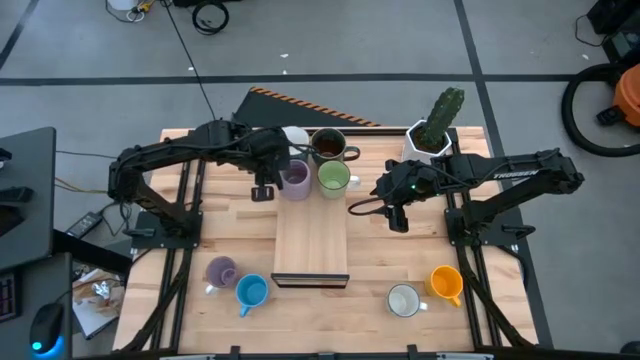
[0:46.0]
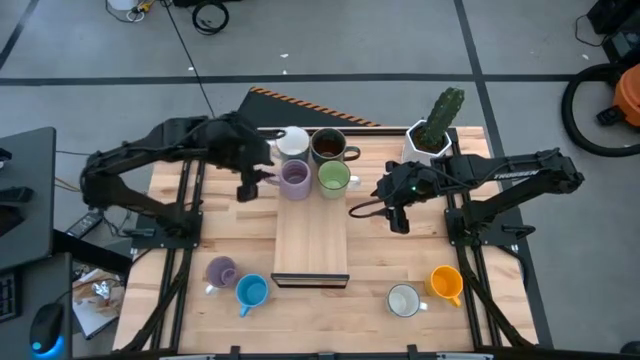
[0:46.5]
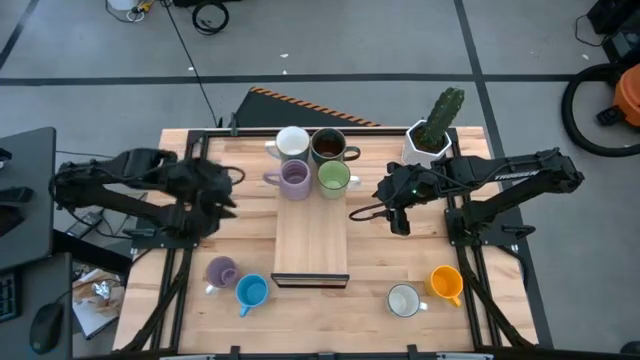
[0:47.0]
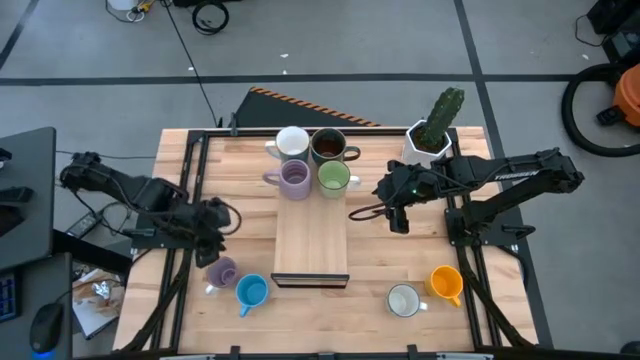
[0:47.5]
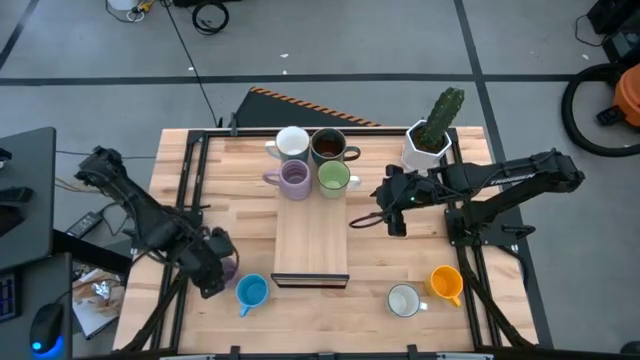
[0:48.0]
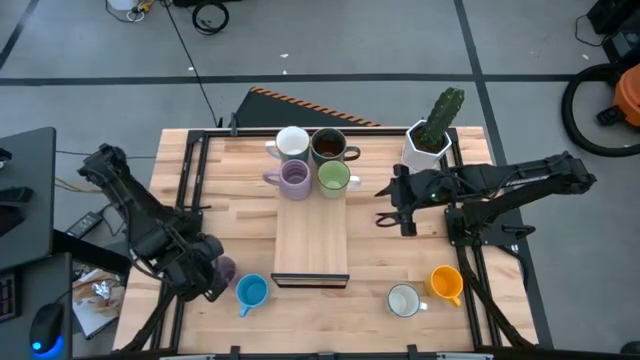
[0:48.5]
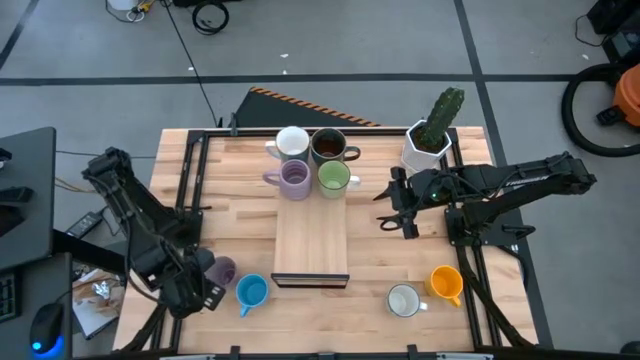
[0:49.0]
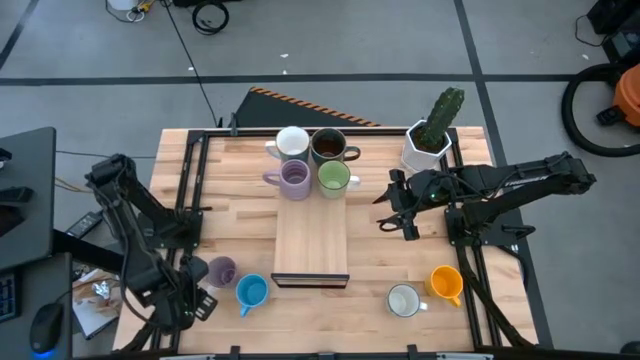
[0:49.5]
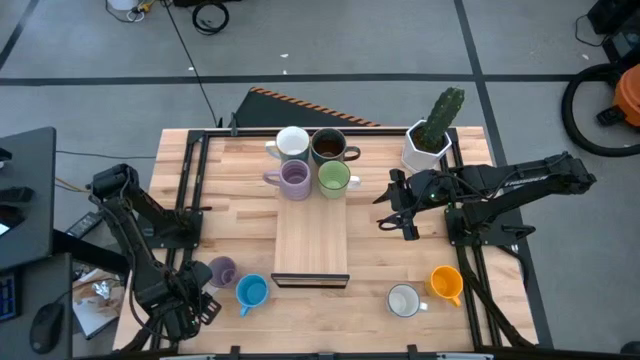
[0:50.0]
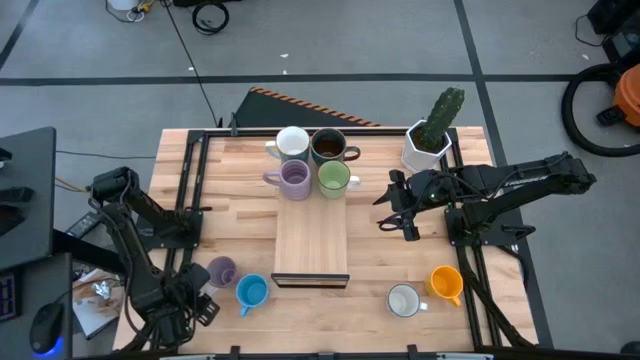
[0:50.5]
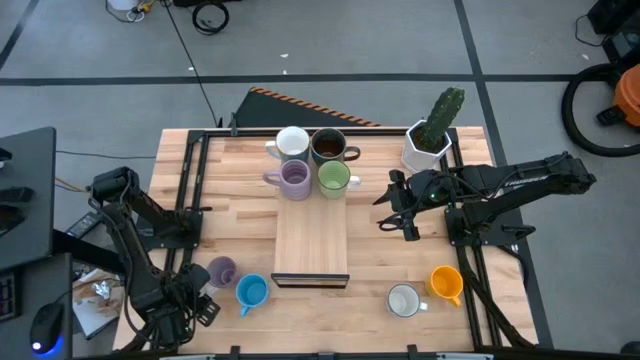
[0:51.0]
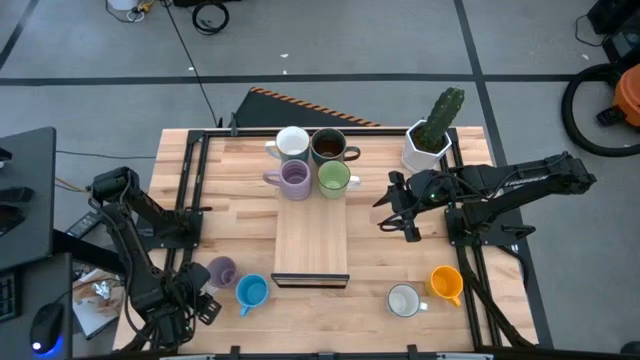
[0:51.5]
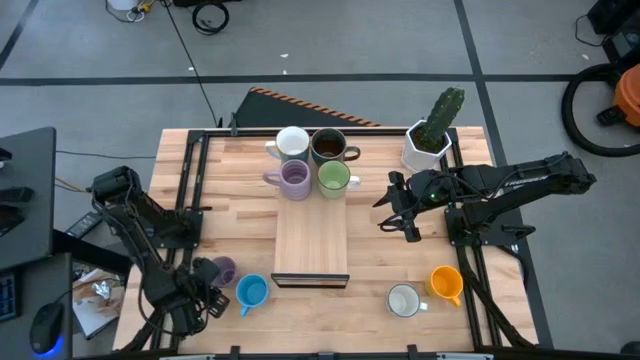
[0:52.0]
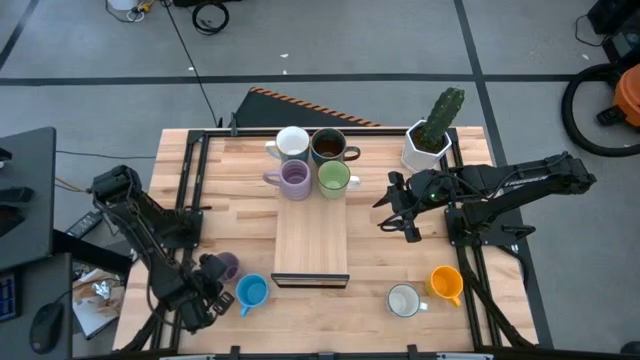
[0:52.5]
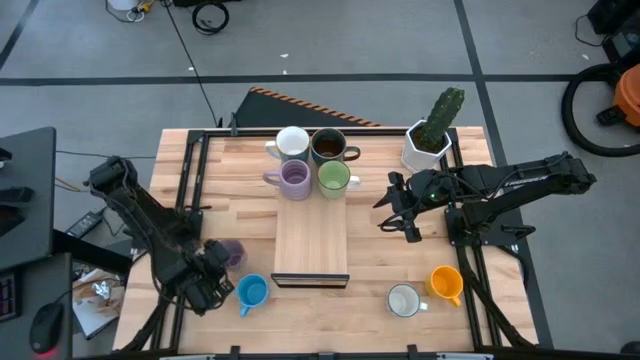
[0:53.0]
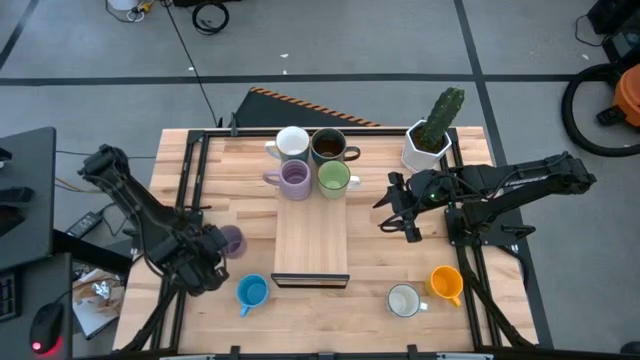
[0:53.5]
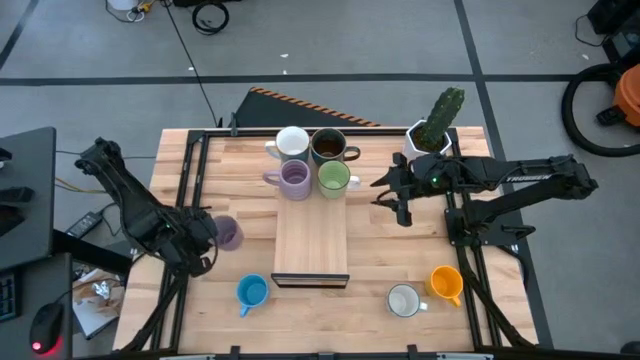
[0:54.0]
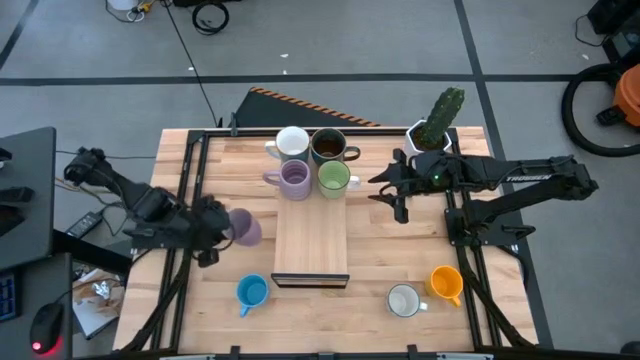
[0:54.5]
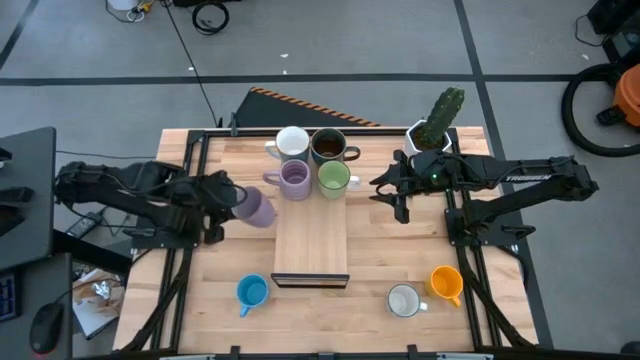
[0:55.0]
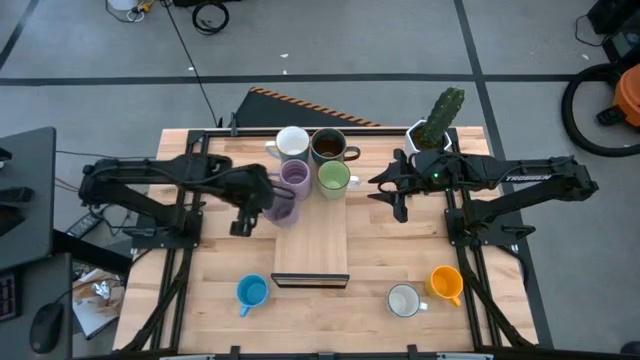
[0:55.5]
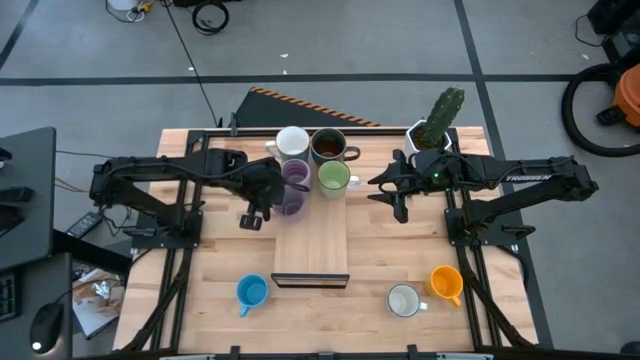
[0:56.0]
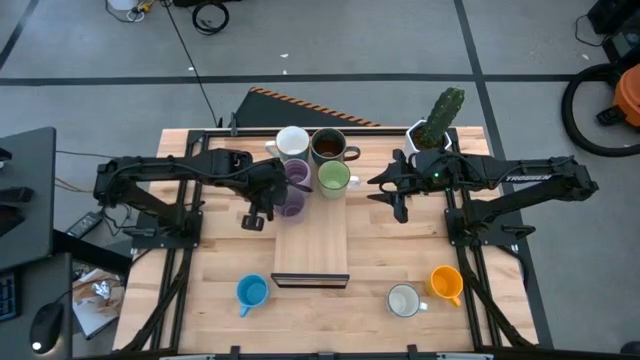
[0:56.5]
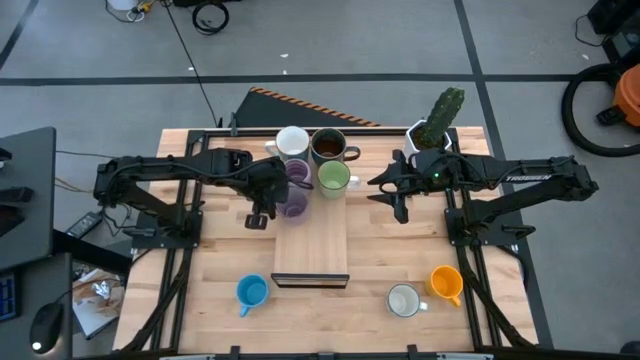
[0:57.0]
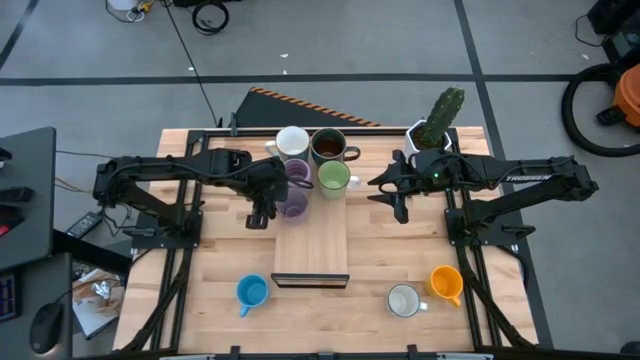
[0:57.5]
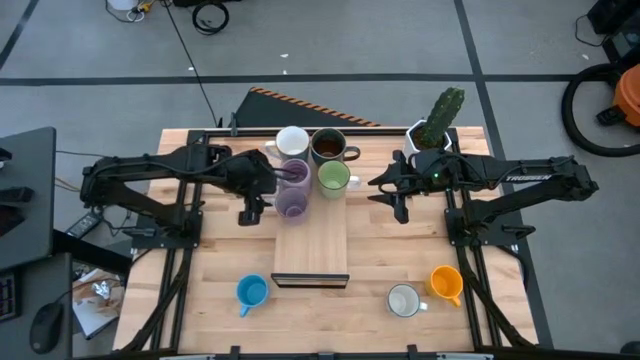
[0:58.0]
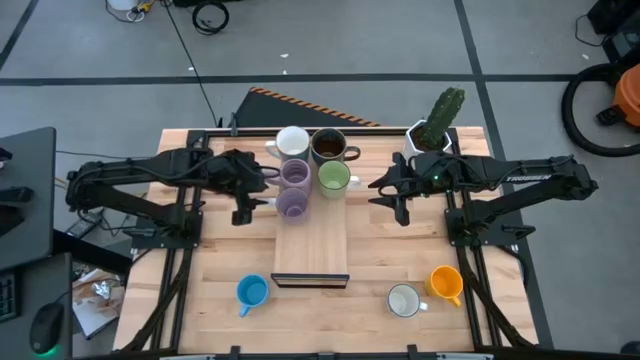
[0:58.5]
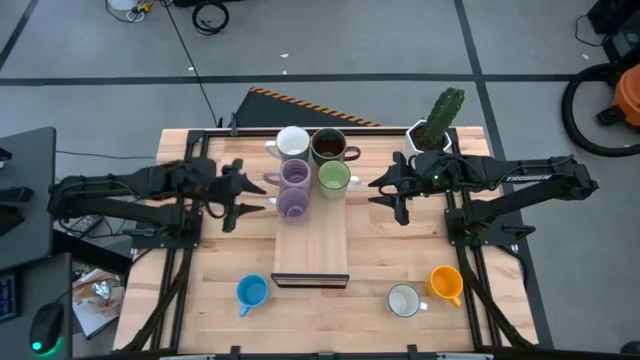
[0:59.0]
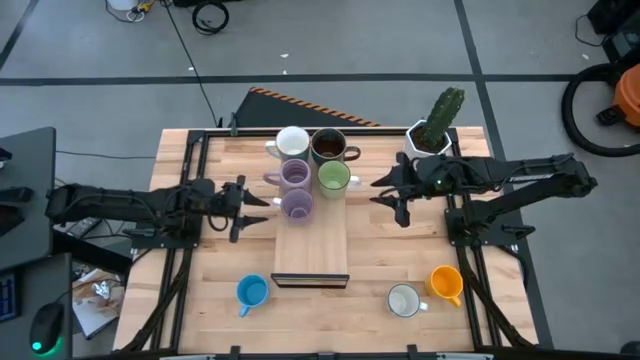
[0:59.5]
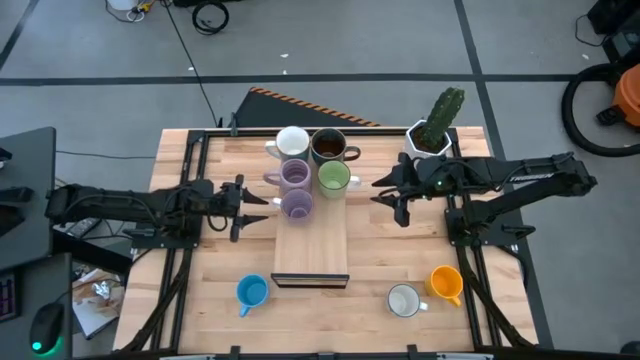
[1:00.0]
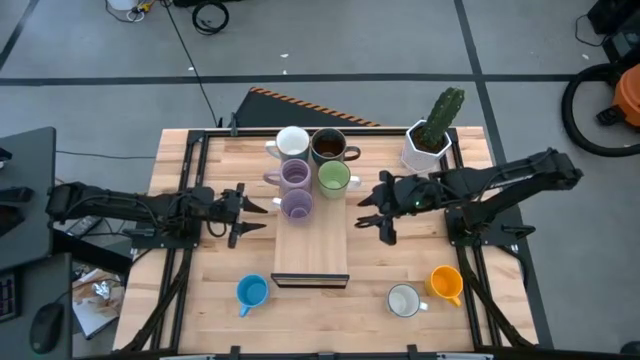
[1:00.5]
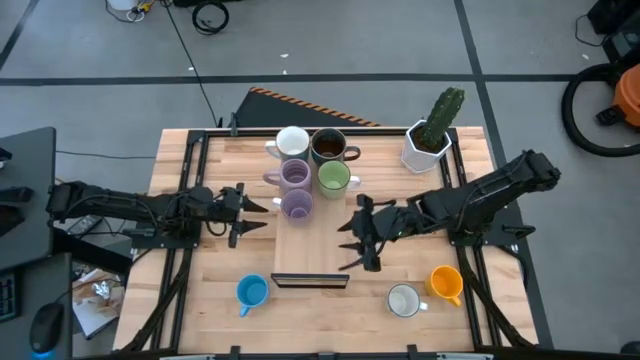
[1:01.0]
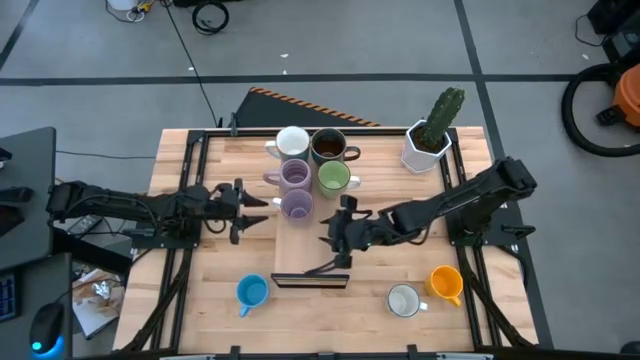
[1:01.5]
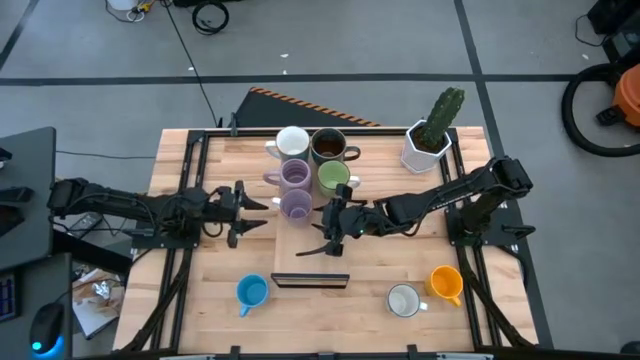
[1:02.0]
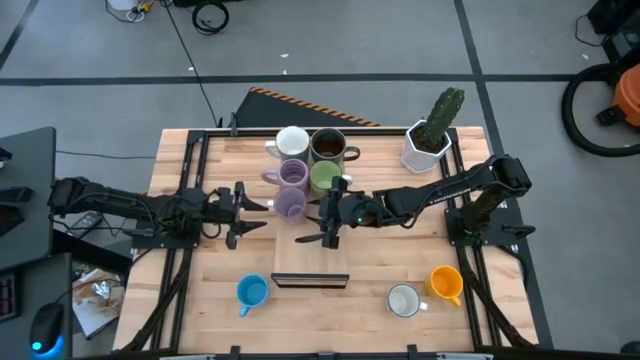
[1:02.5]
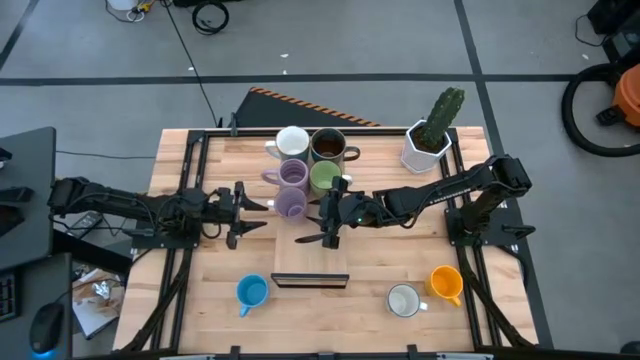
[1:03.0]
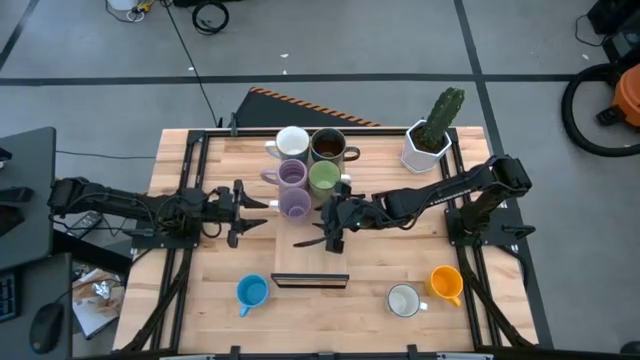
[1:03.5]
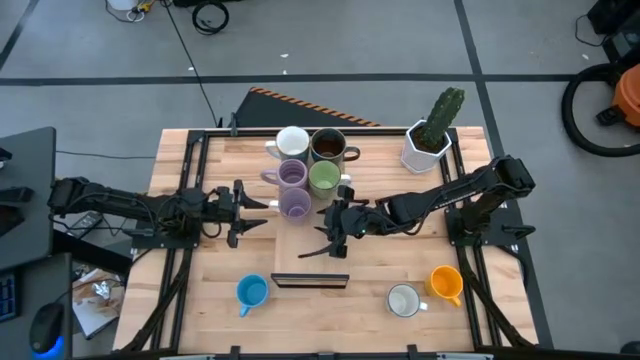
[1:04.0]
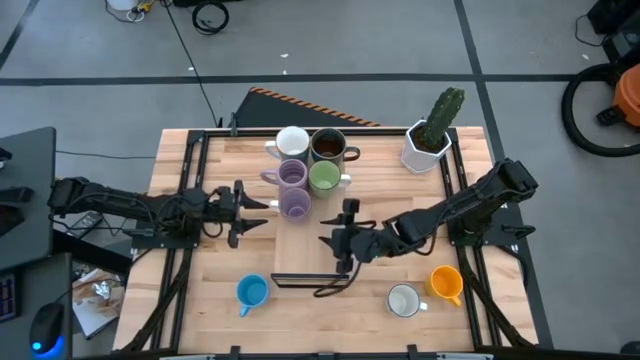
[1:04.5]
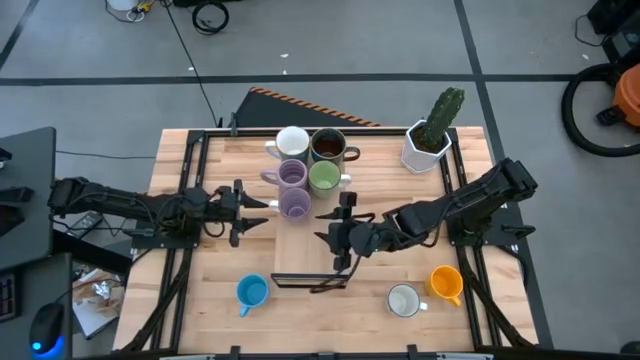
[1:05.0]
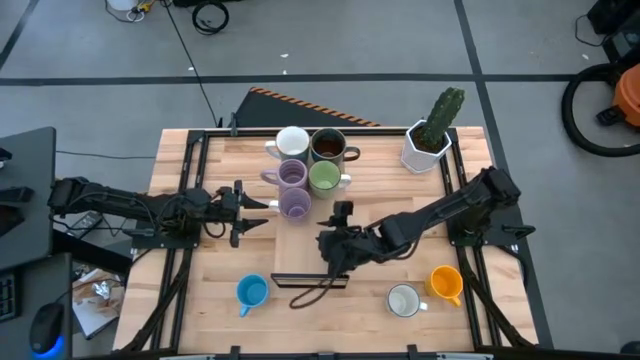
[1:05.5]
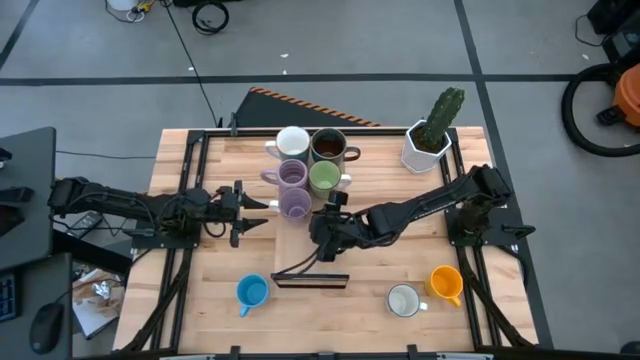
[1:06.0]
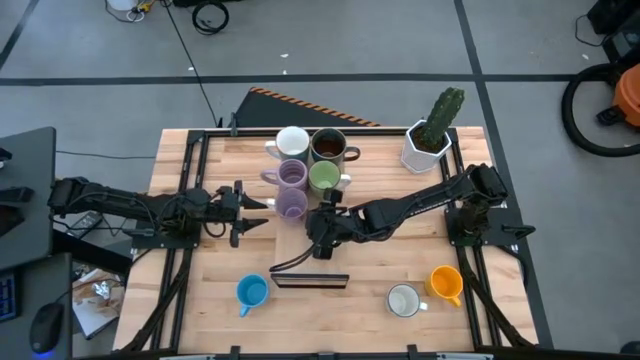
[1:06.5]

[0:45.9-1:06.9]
Task: Place coffee mugs
Put the purple mug on the shelf
